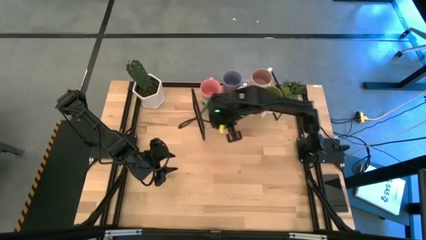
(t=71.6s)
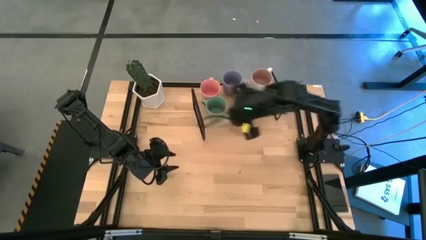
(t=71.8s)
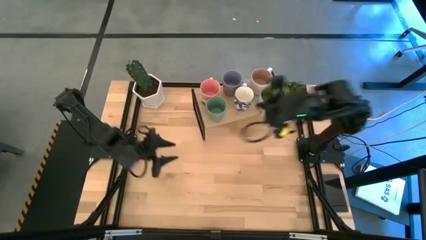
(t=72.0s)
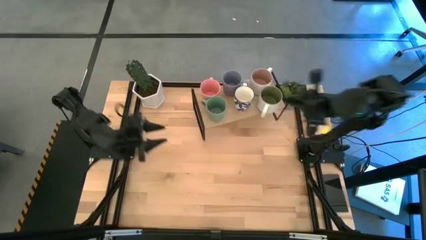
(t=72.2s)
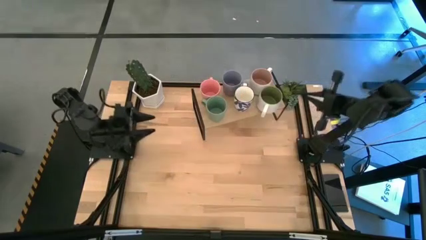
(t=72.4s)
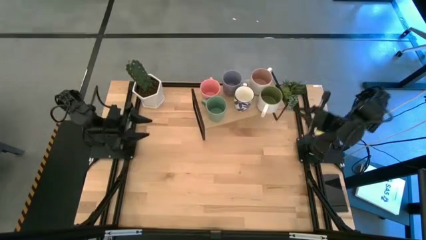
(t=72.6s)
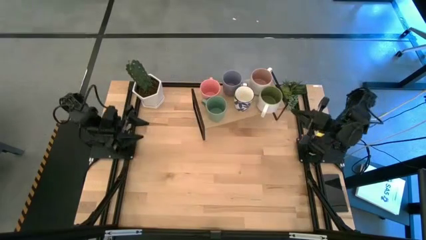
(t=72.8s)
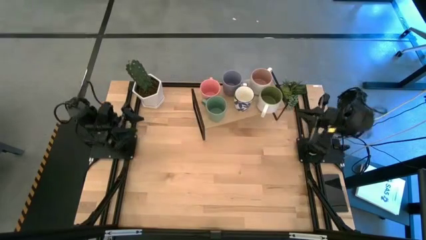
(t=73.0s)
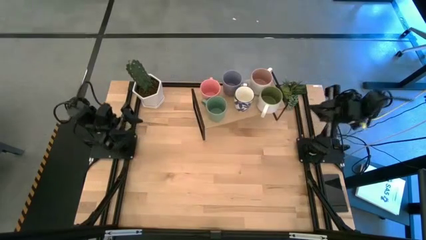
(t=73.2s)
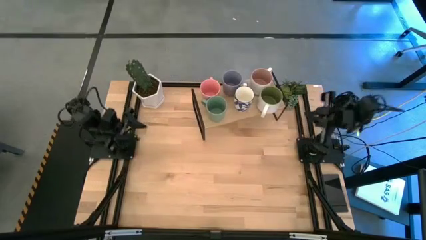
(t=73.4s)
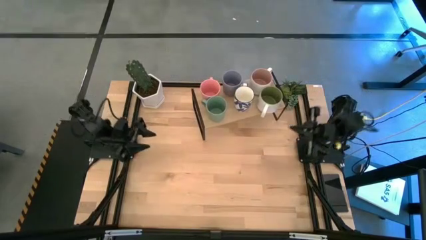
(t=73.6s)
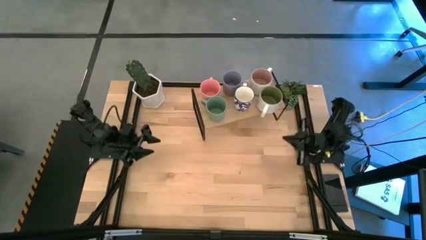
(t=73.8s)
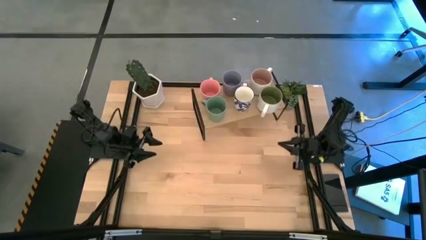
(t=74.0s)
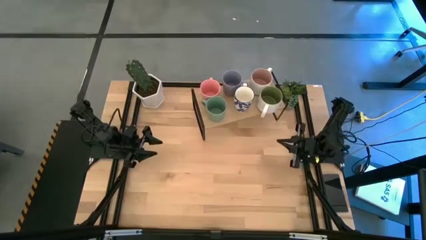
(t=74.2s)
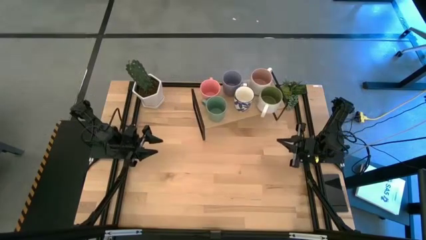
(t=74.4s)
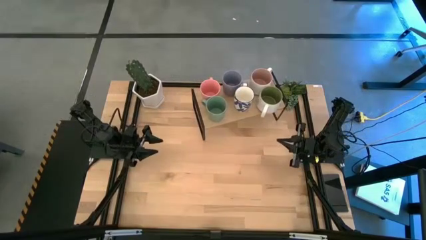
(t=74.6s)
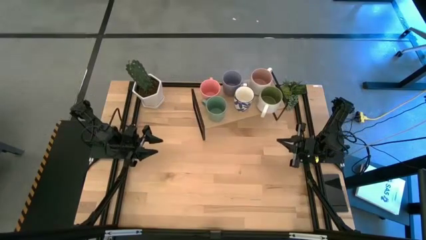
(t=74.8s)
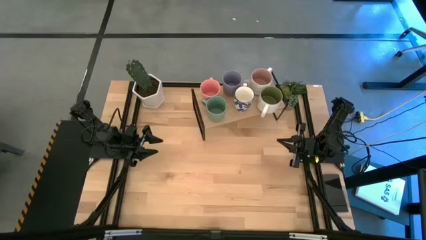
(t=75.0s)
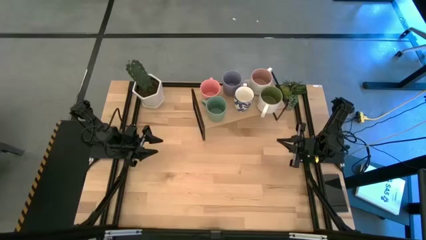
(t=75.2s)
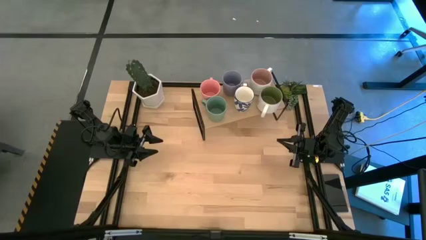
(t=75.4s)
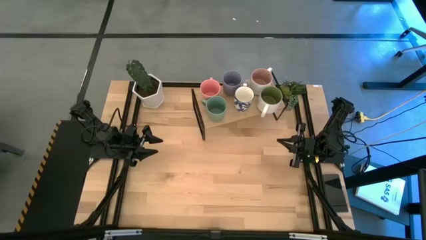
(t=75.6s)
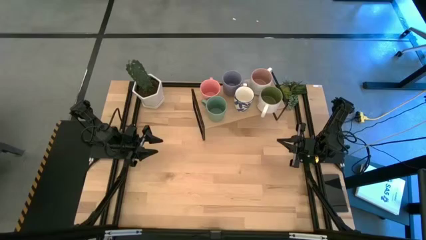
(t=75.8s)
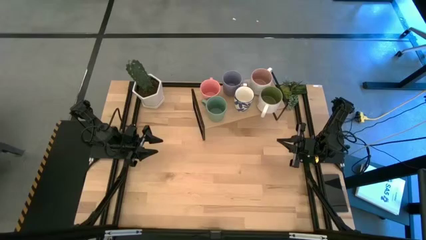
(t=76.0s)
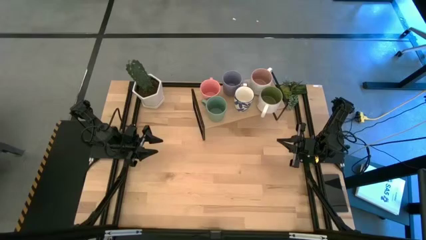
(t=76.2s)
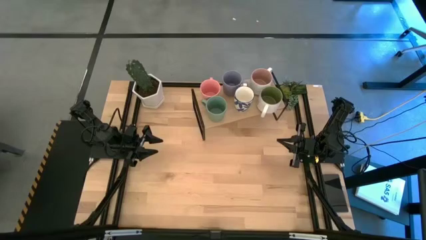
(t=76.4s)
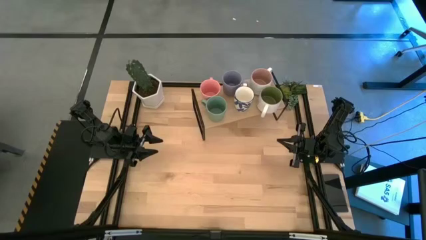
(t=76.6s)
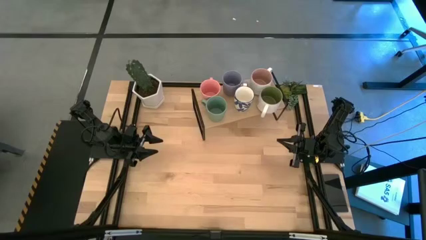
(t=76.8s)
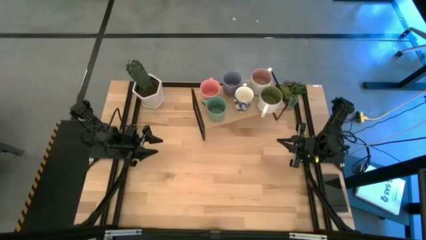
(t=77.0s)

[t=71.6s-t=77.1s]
Task: Place coffee mugs
Return to Home Position

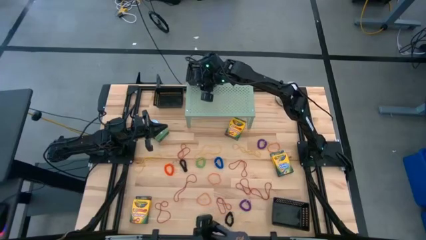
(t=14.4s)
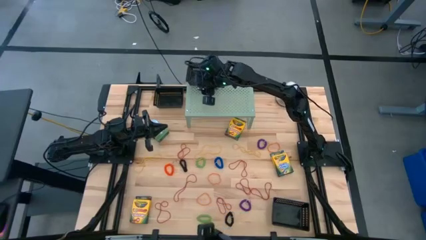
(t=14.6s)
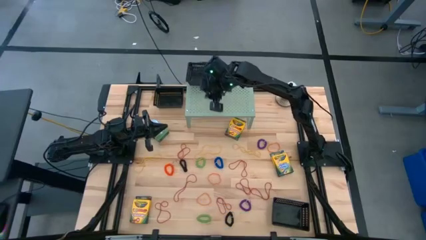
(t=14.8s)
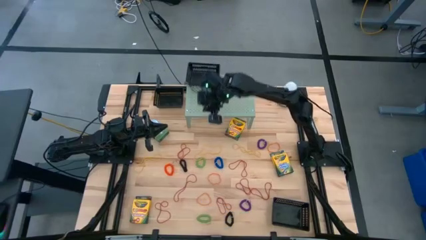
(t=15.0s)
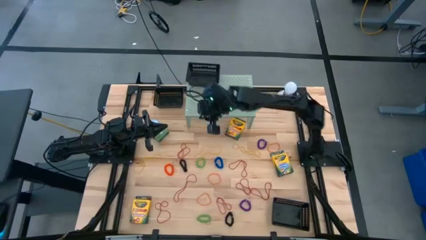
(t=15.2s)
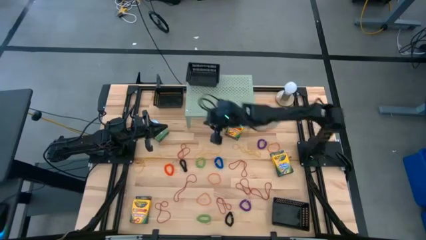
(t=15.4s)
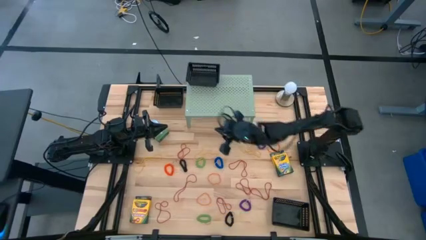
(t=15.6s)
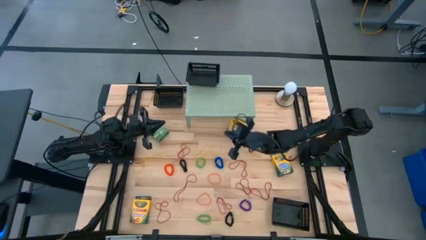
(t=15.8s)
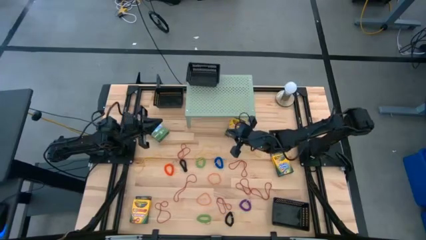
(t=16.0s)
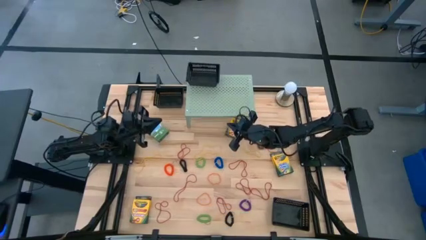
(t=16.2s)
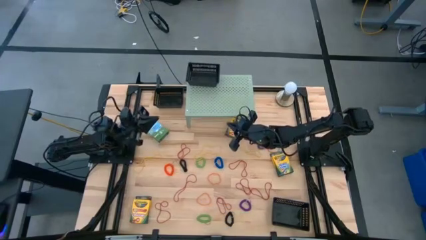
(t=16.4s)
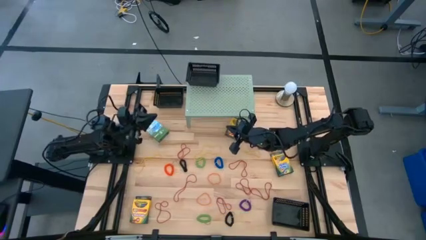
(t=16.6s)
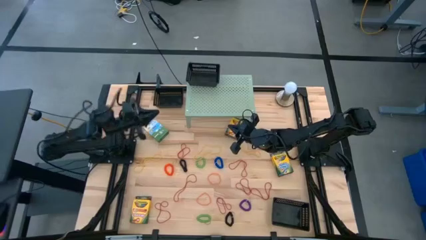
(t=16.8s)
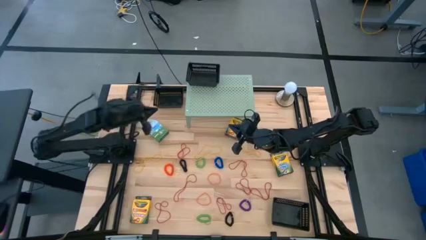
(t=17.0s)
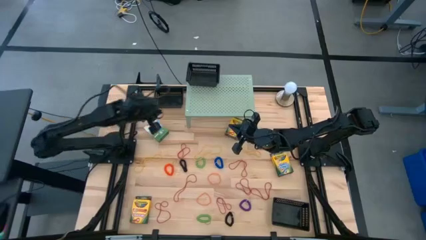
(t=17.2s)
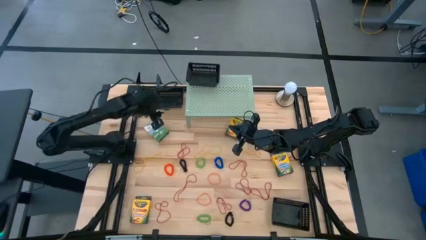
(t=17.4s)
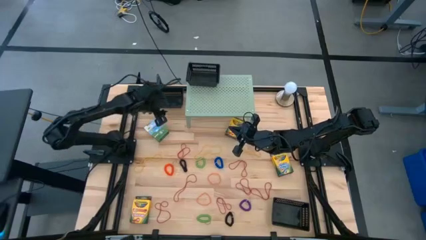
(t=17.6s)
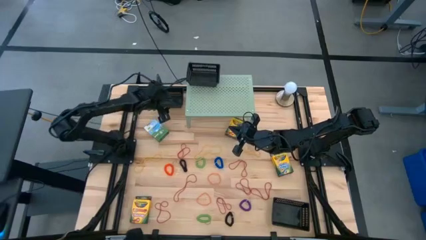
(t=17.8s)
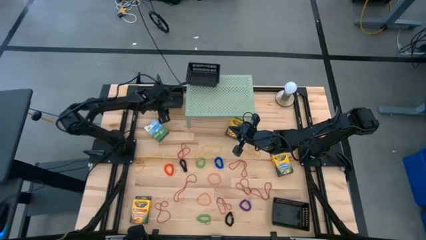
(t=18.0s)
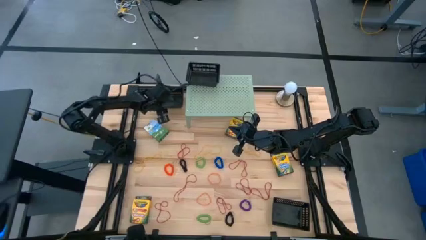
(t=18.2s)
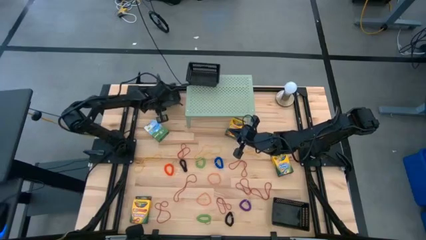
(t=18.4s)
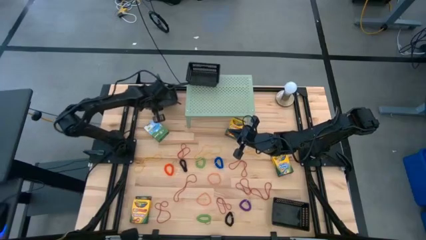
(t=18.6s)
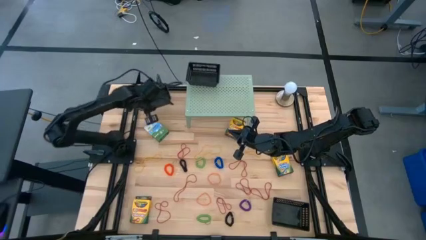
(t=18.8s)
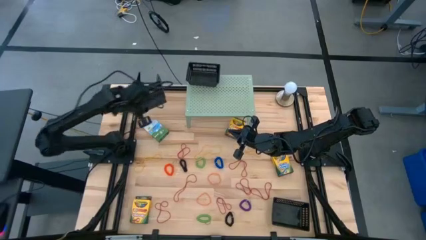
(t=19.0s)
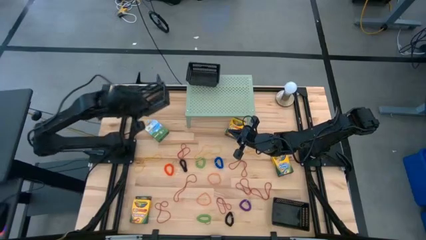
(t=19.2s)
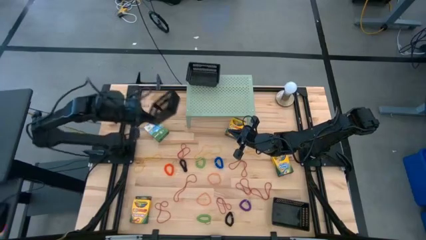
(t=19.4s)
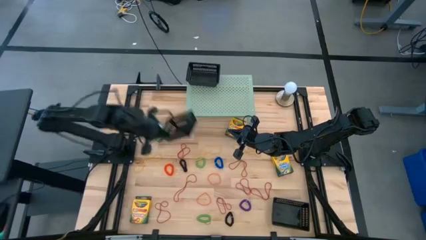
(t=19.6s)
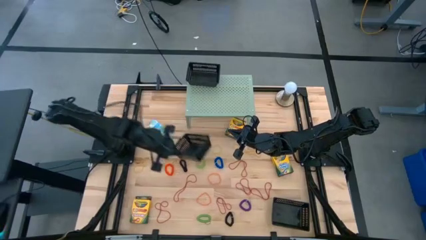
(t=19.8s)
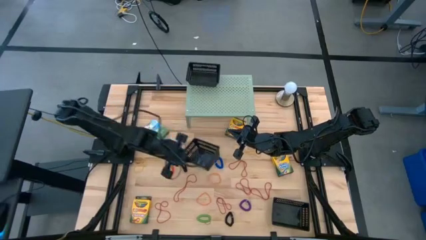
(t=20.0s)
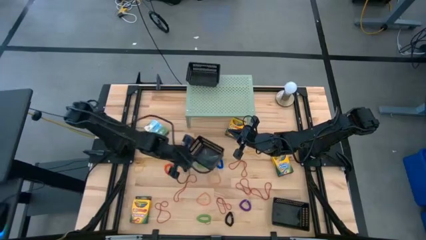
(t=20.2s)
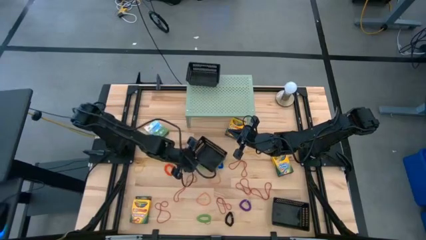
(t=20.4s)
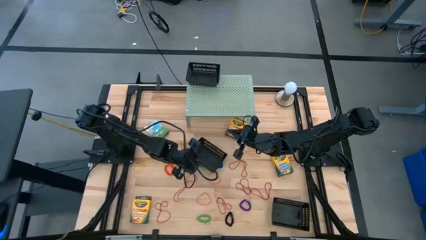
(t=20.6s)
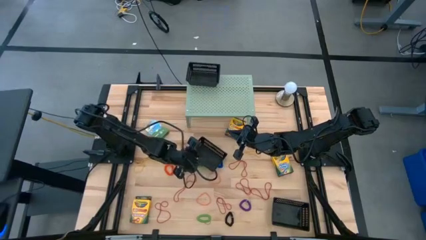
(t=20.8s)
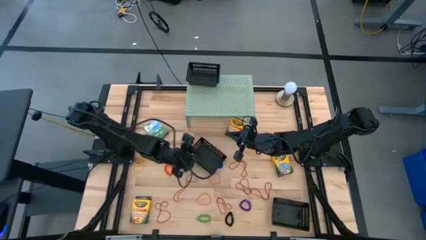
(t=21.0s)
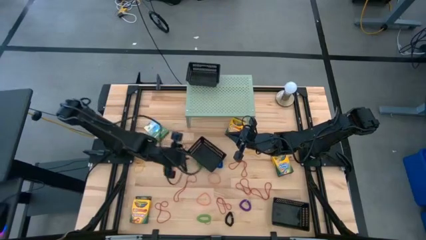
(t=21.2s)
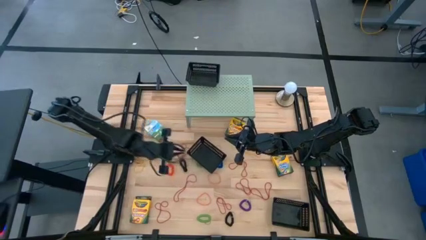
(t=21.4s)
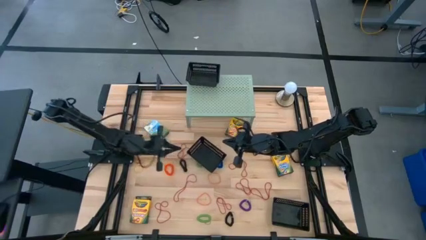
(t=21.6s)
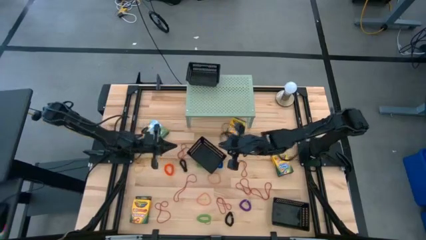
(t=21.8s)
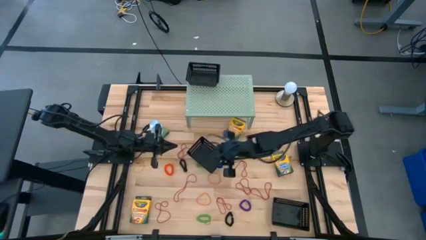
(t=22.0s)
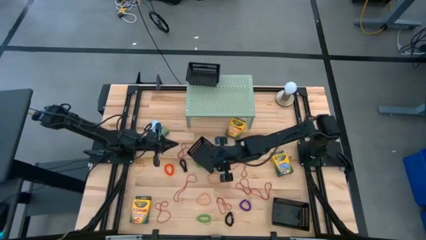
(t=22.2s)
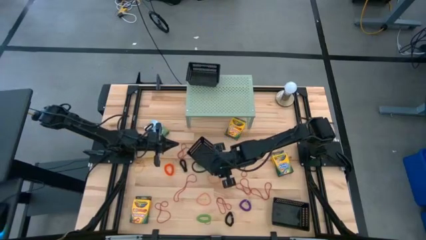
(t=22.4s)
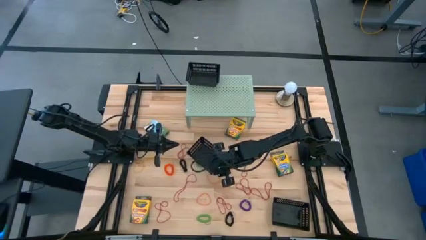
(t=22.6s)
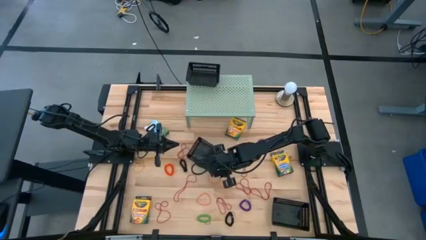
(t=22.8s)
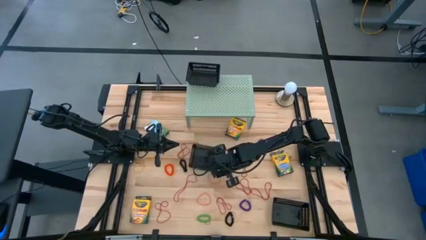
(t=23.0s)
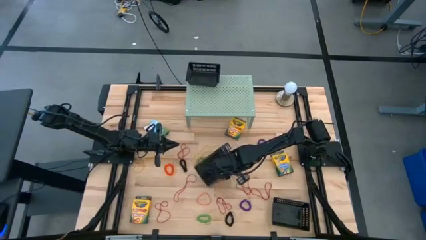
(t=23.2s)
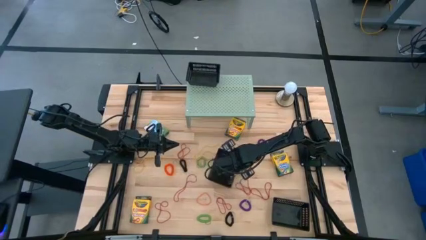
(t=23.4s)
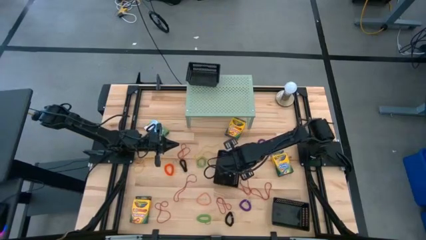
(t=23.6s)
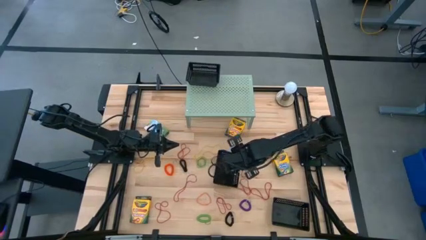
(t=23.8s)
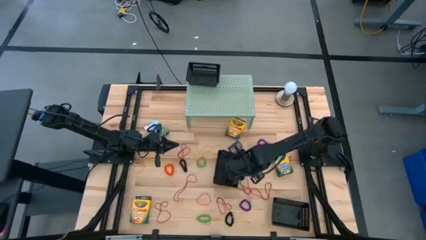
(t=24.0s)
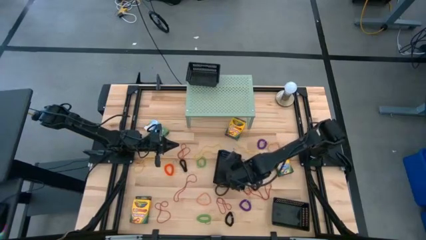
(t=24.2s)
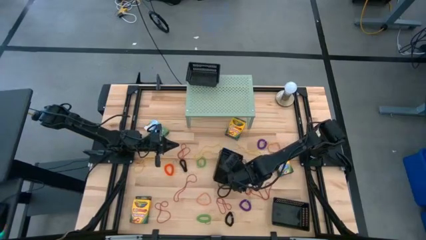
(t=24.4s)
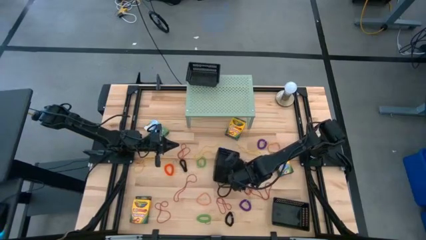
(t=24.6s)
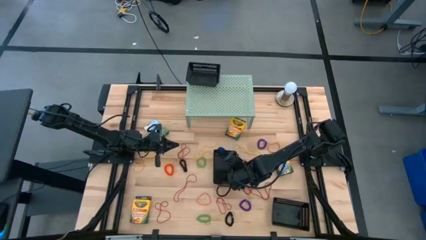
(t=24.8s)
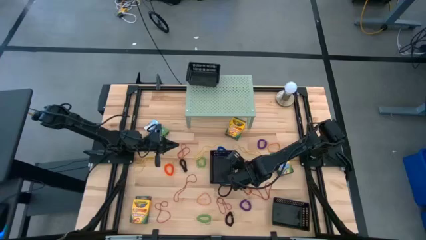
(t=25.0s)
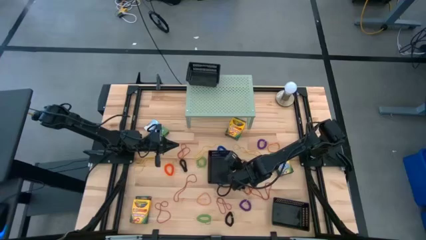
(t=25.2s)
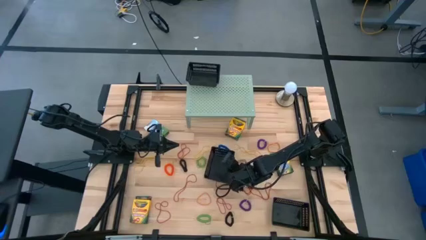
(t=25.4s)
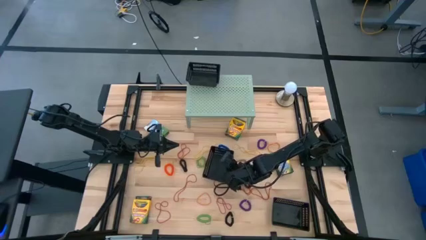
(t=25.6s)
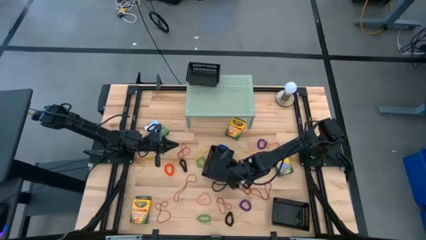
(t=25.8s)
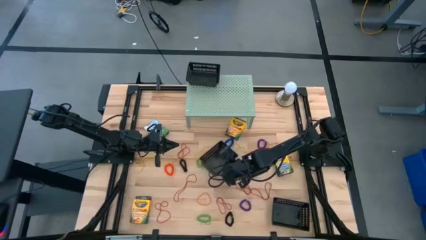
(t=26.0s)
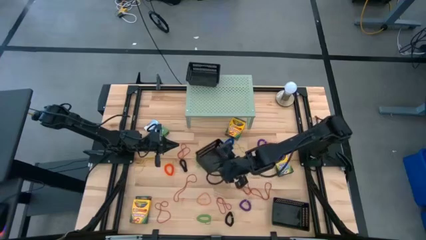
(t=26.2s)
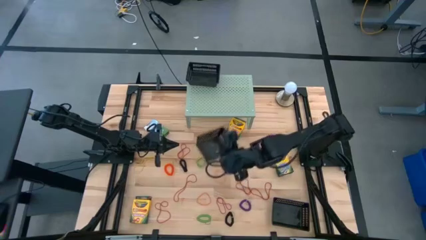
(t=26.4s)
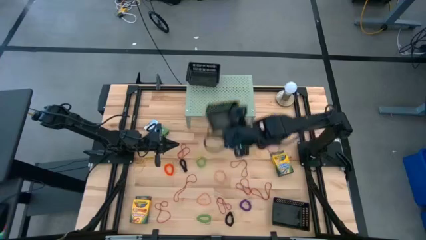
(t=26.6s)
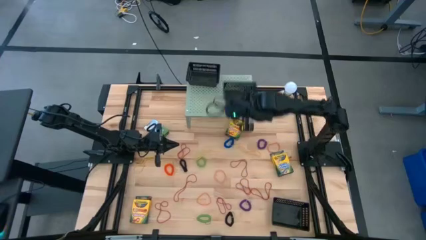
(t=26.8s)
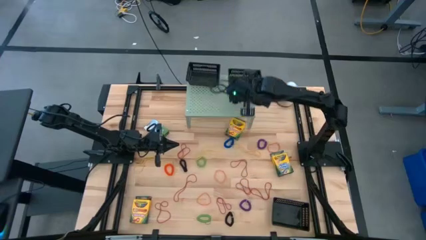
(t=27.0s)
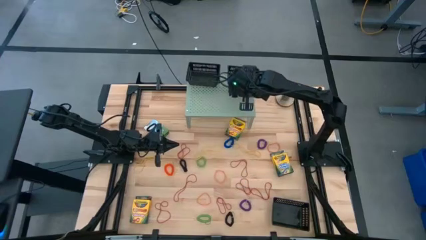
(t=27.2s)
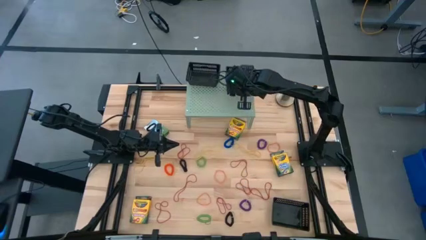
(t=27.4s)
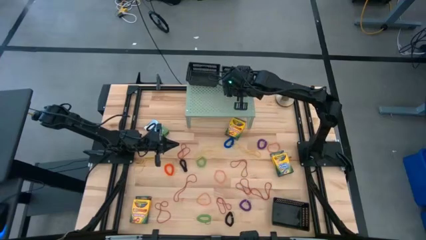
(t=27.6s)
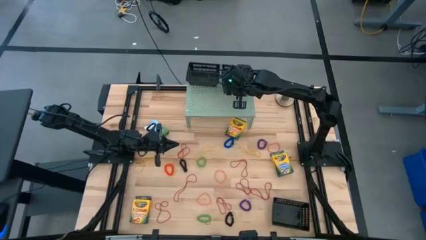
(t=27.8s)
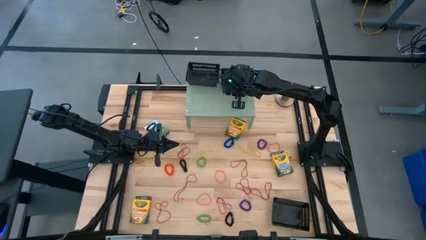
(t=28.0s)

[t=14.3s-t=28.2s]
Task: Pick & Place Office Desk Supplies
Put the top black bin on the shelf
